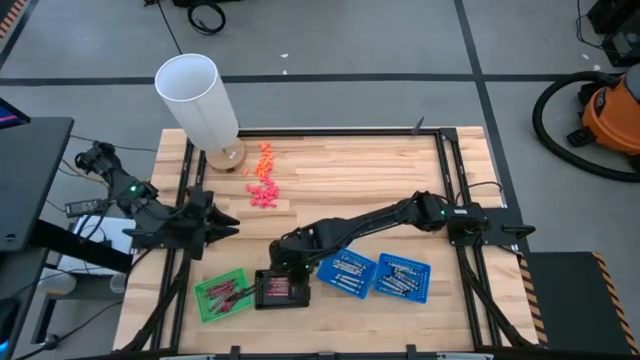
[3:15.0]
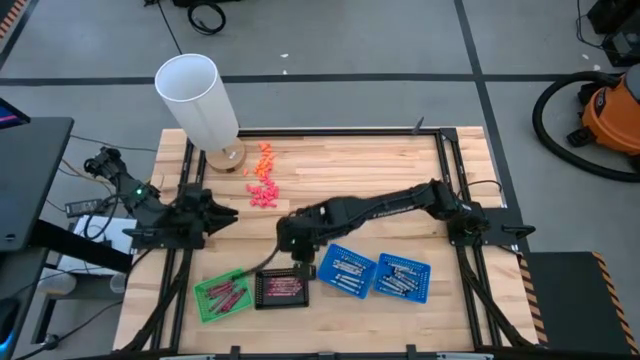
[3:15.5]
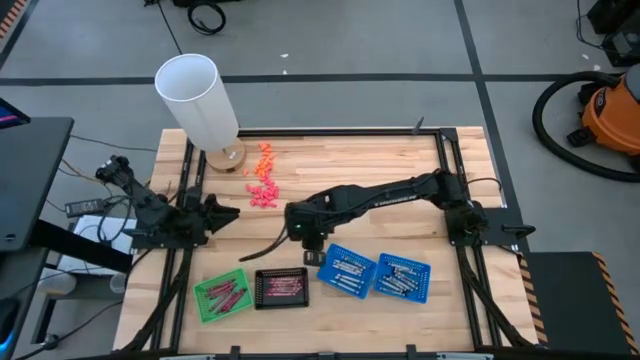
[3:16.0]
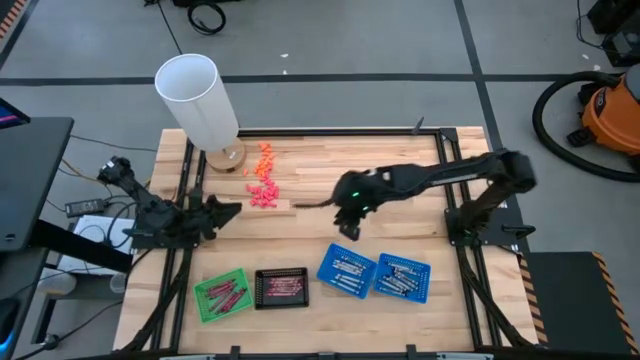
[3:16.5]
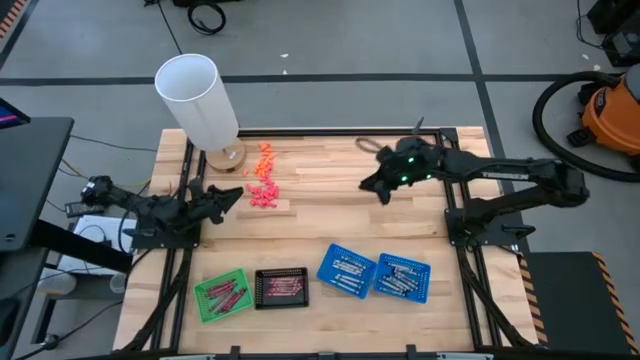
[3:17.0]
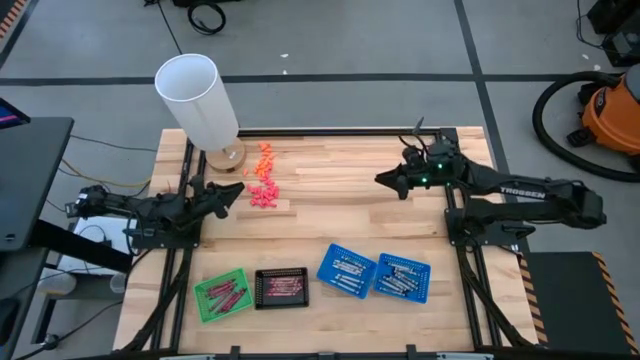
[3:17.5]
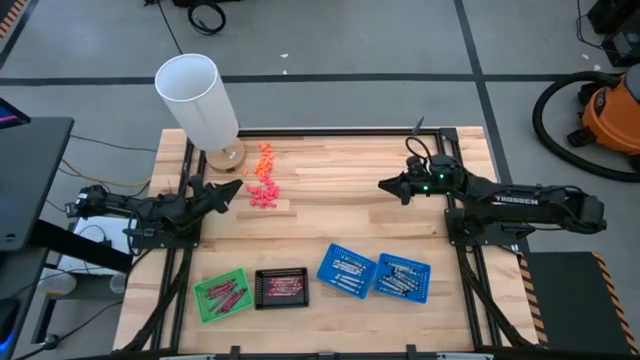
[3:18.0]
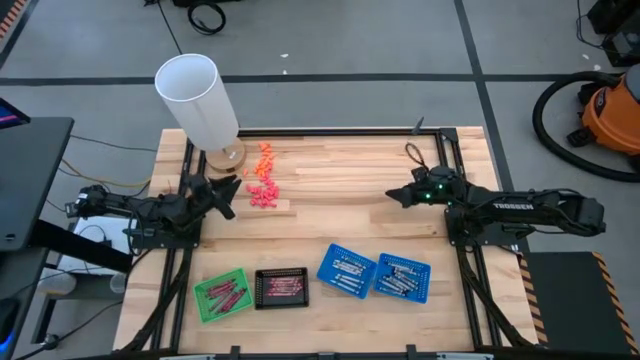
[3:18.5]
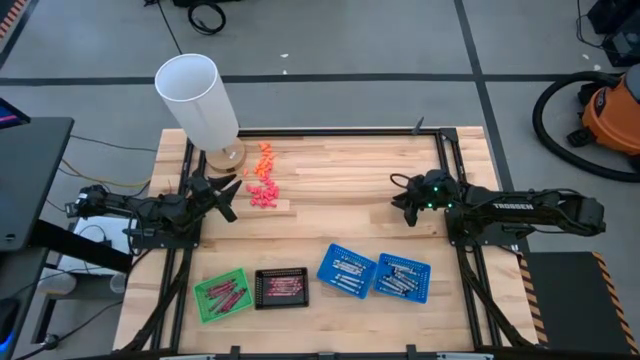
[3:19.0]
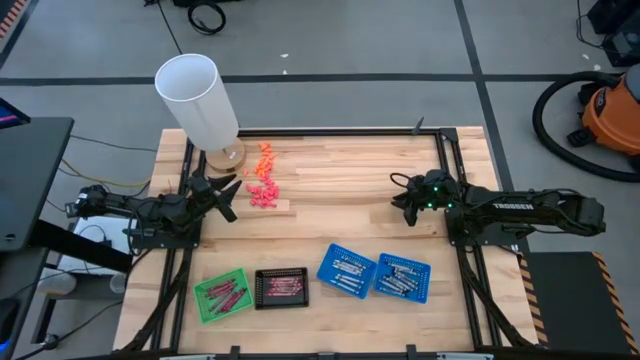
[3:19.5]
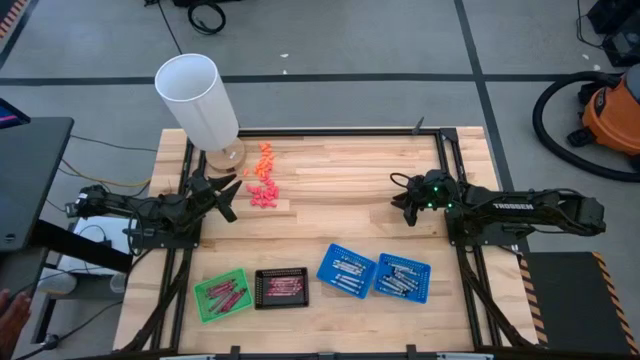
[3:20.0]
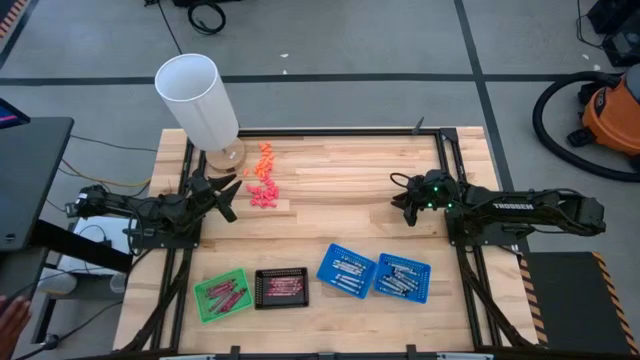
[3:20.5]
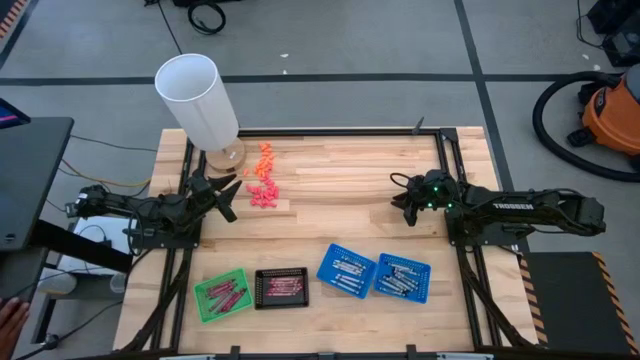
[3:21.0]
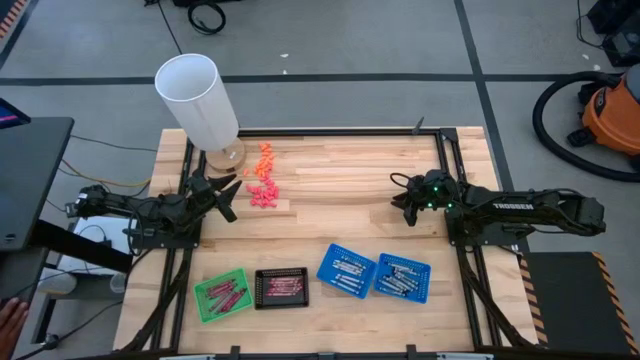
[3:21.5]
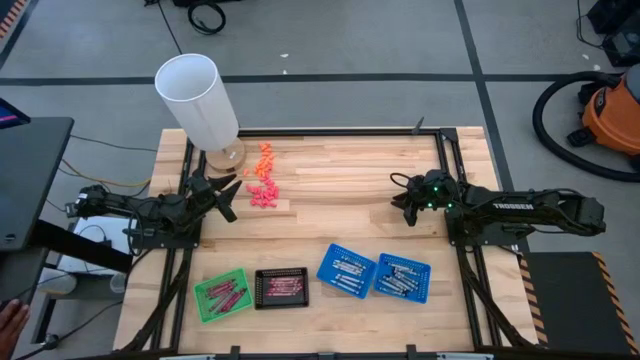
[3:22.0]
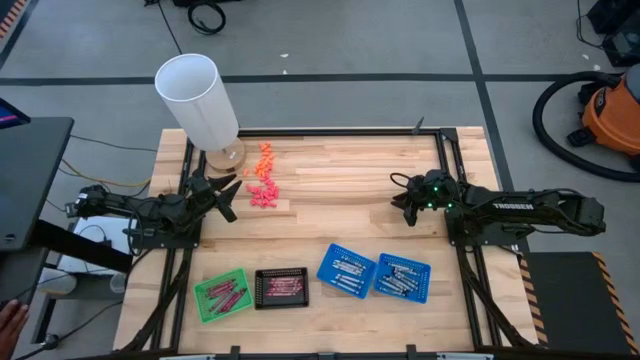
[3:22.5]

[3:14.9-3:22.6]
Task: Sort crayons
Return to Home Position

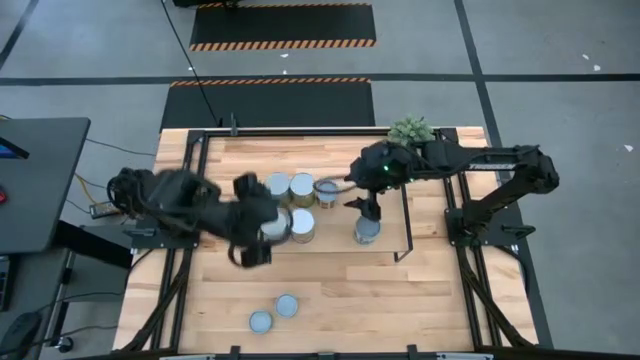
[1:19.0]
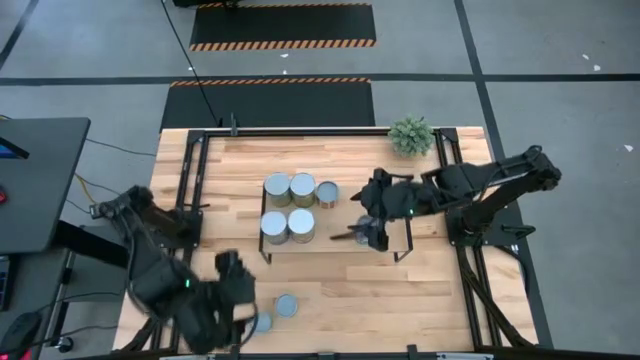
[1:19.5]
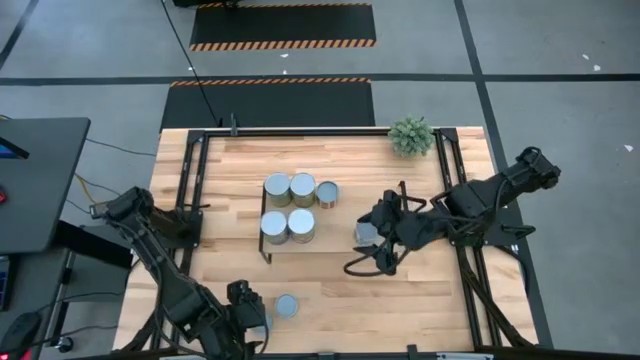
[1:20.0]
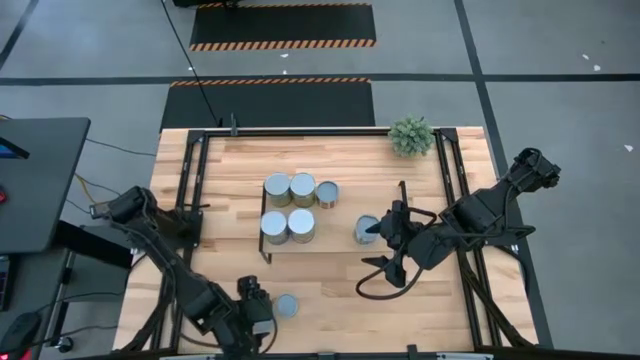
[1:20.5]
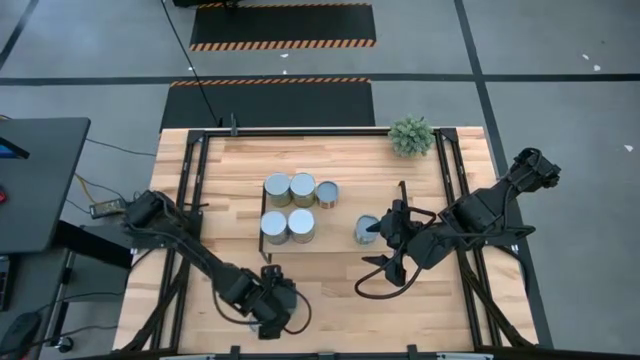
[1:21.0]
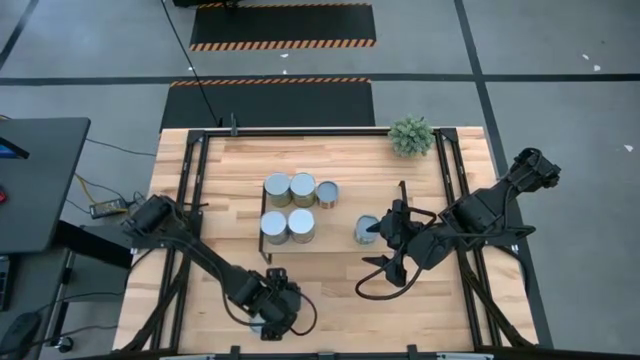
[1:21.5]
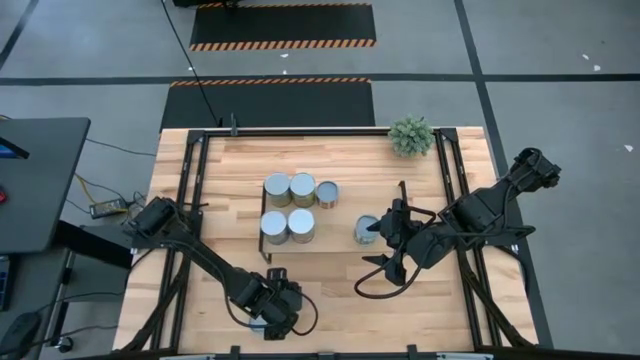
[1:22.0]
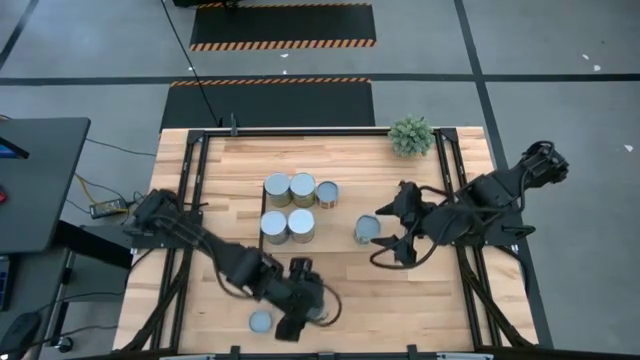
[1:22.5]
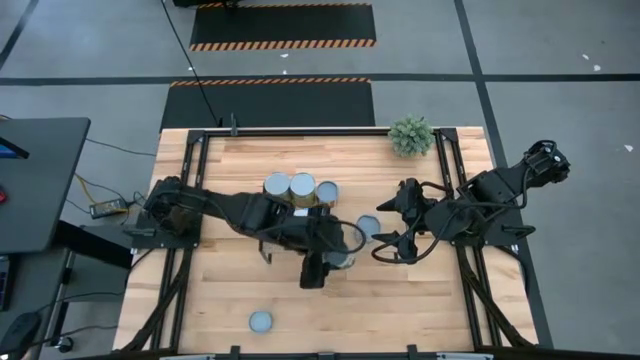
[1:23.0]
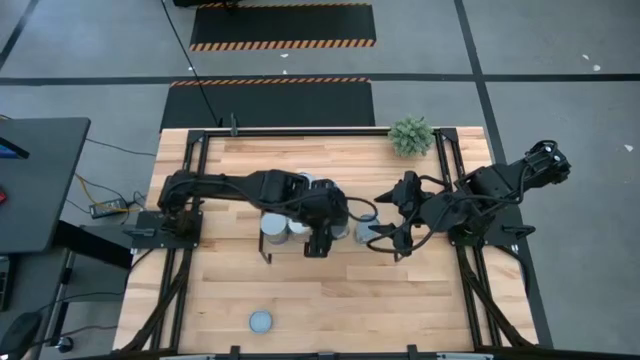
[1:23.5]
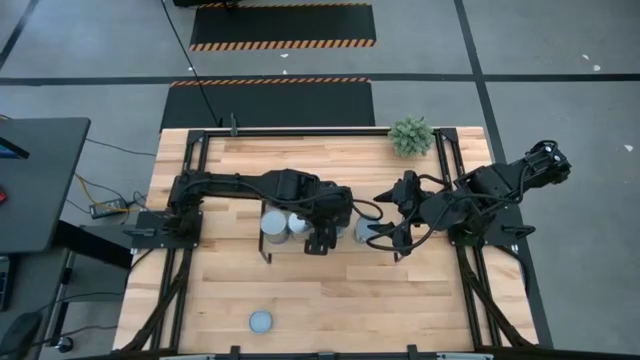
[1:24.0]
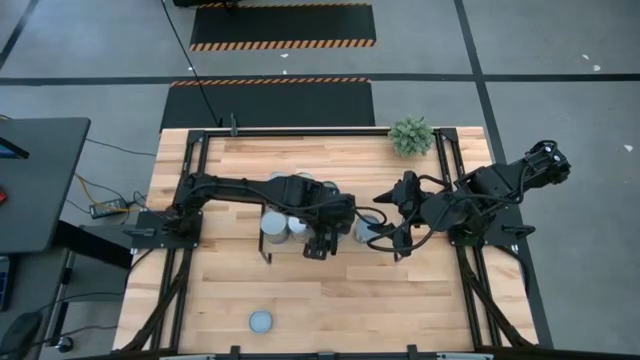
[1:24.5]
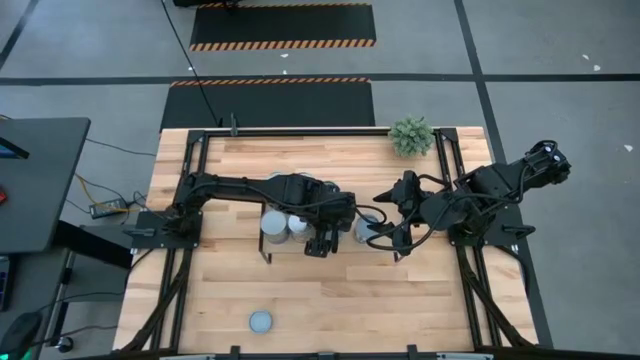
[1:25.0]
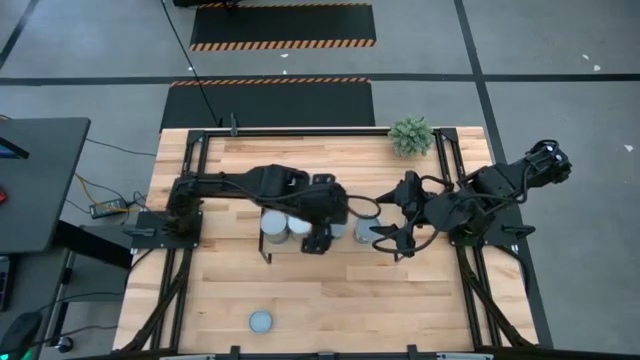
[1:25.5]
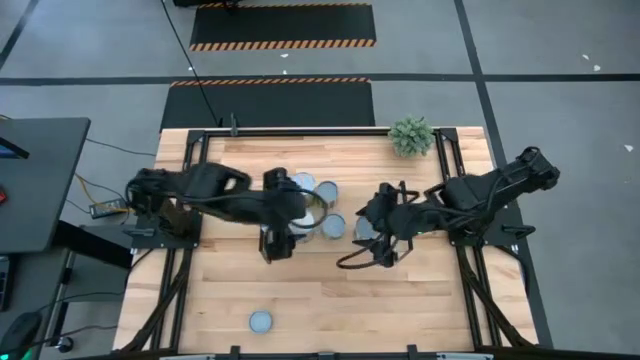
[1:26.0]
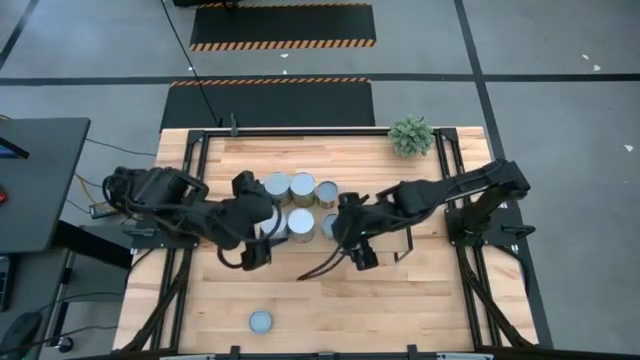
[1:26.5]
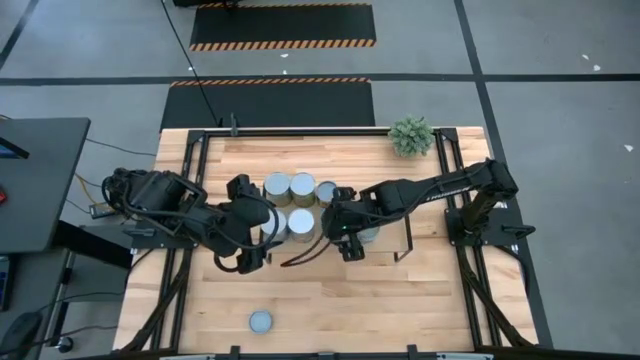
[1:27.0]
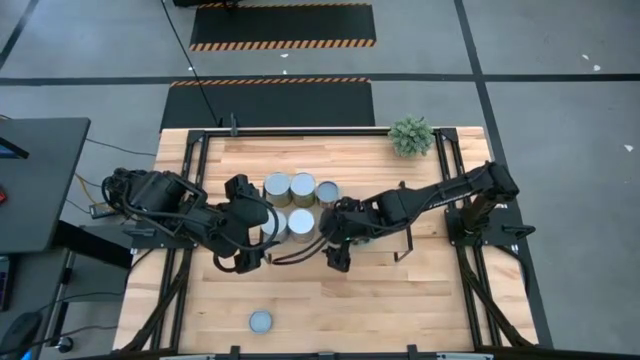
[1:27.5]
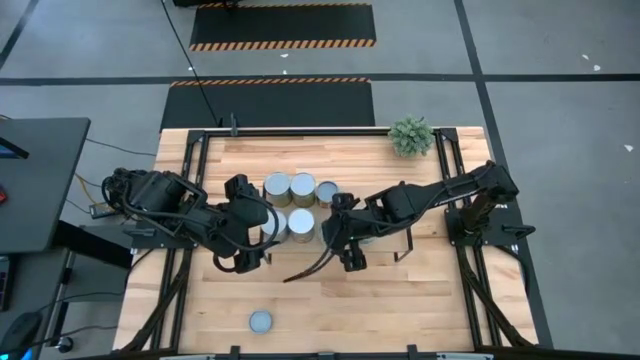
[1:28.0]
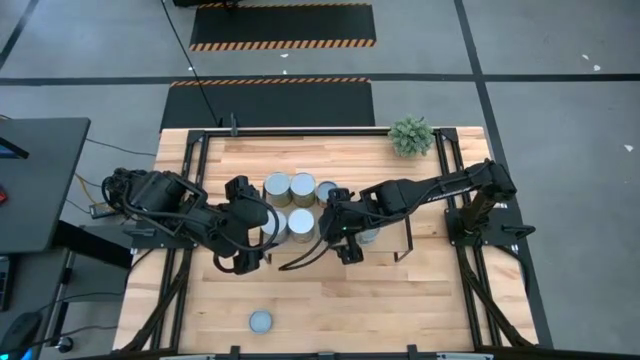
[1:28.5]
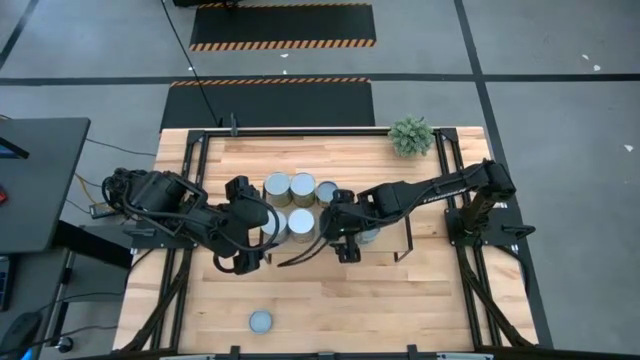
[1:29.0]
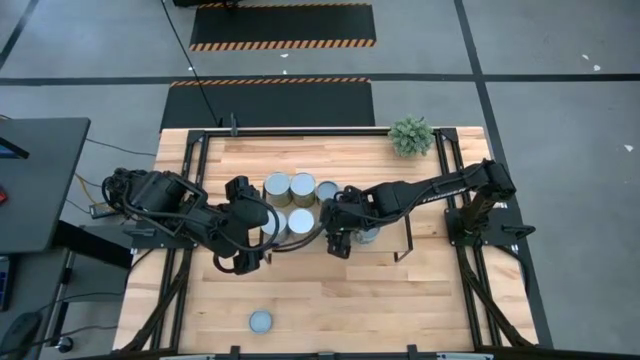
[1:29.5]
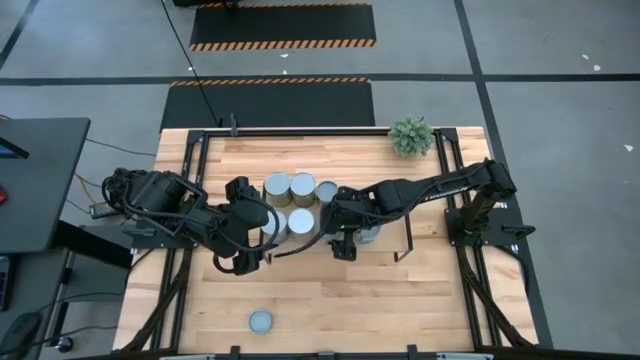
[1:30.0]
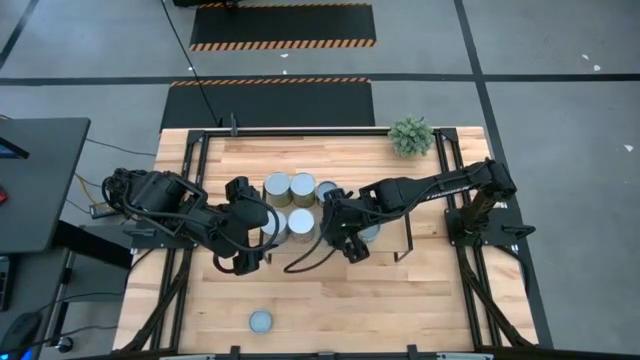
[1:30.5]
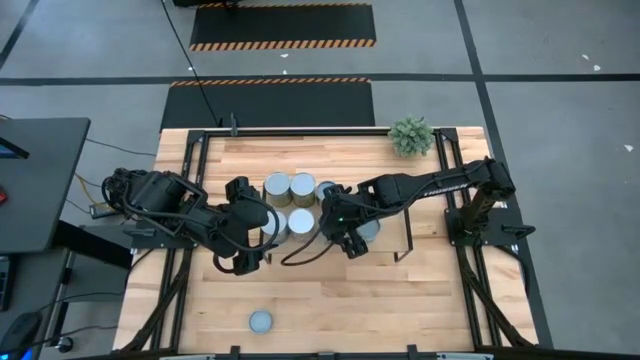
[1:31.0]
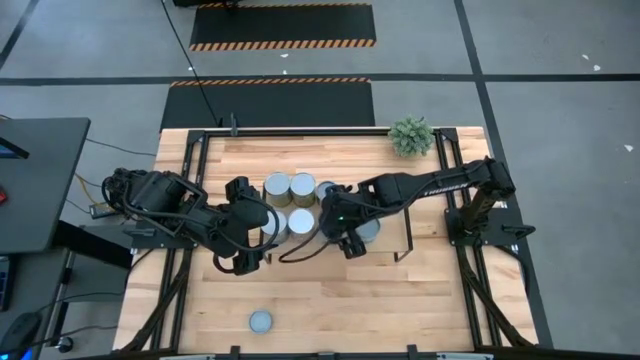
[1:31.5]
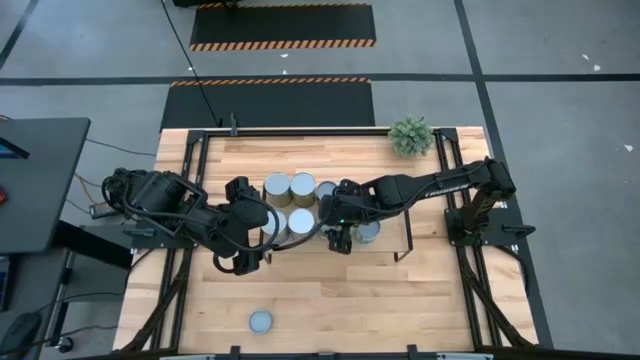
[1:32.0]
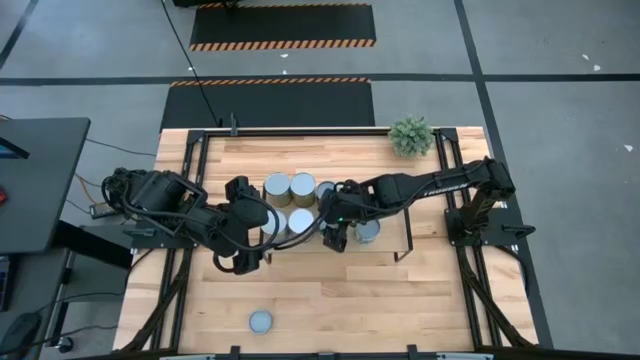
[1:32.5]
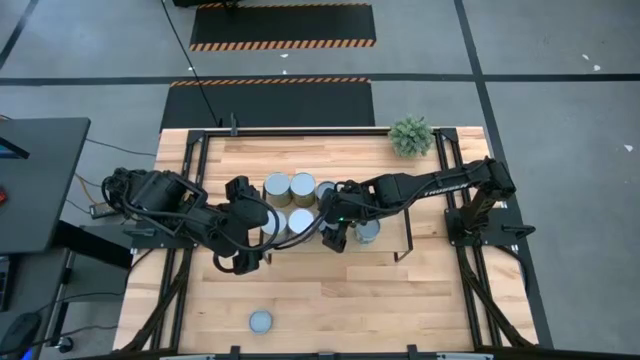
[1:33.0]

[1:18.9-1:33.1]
Task: Pick and place cans onto a shelf
Put the canned green peas on the shelf
